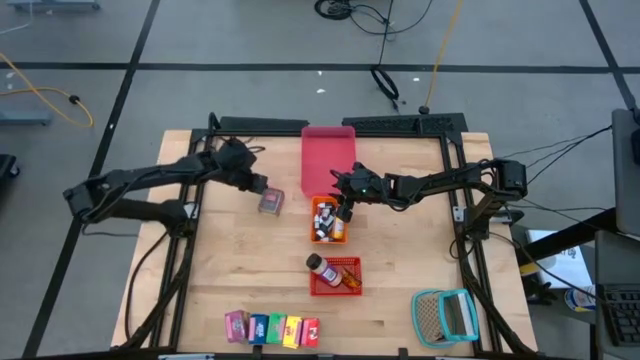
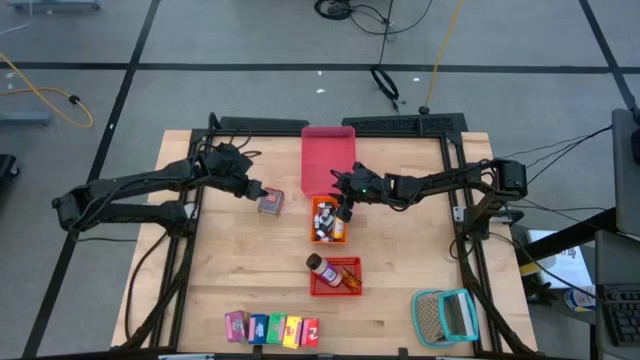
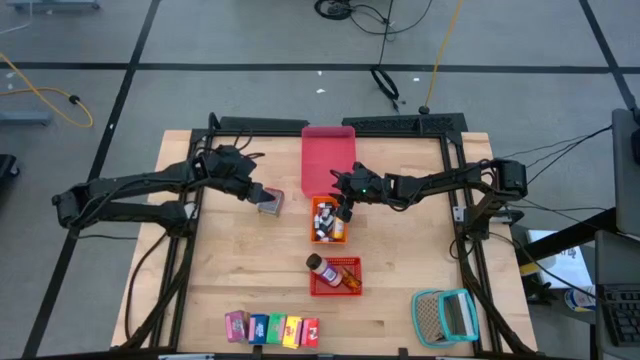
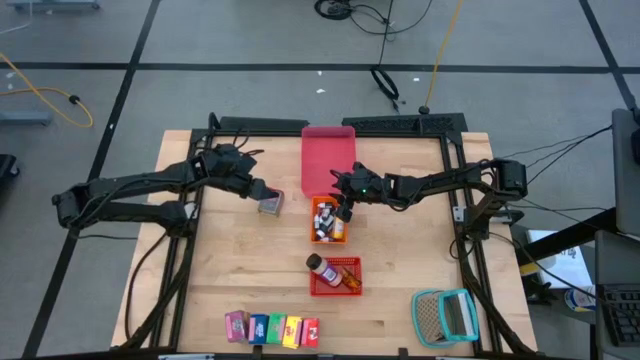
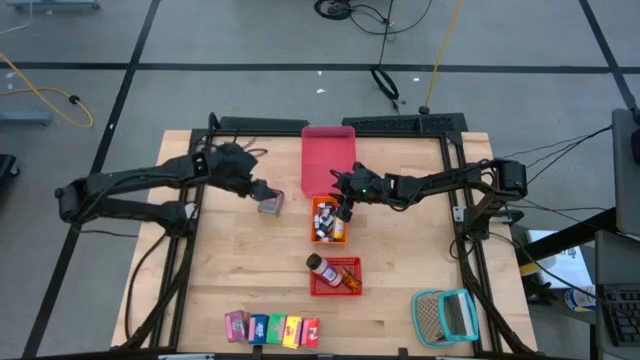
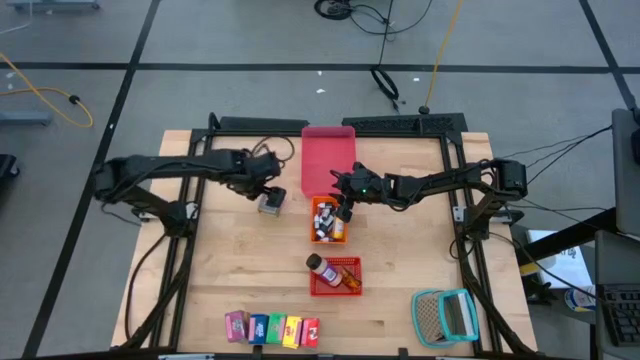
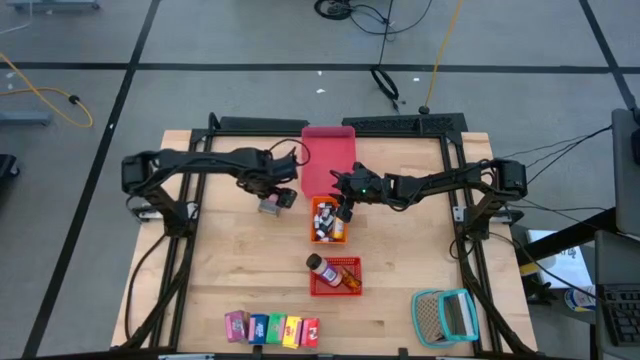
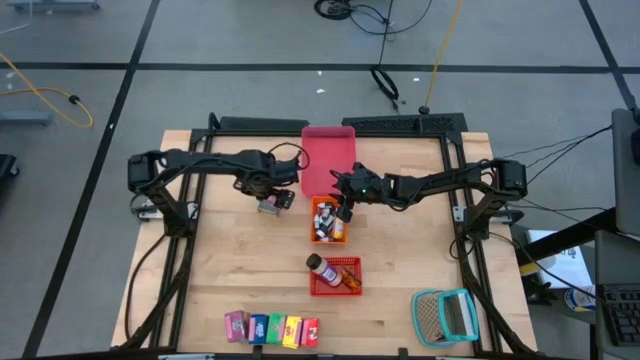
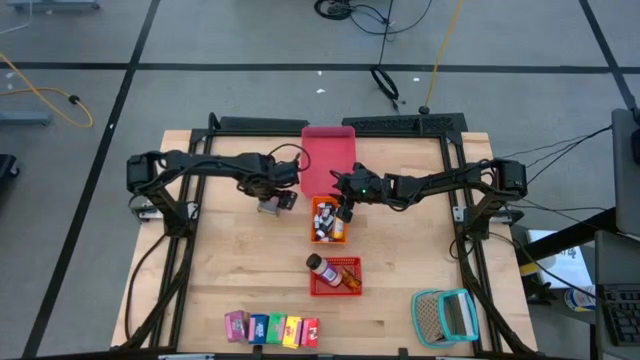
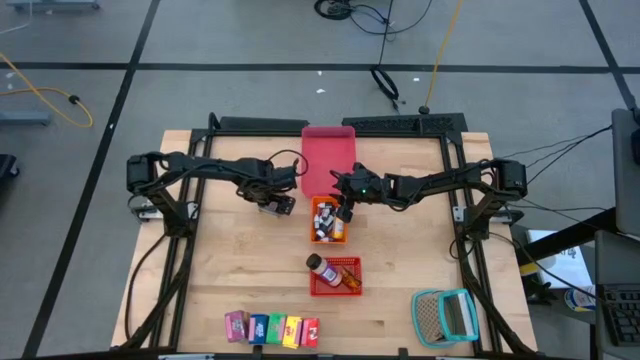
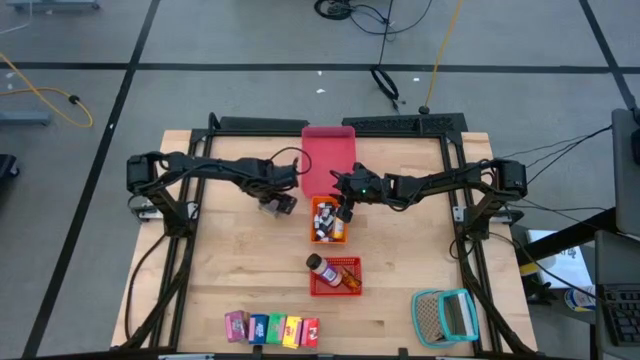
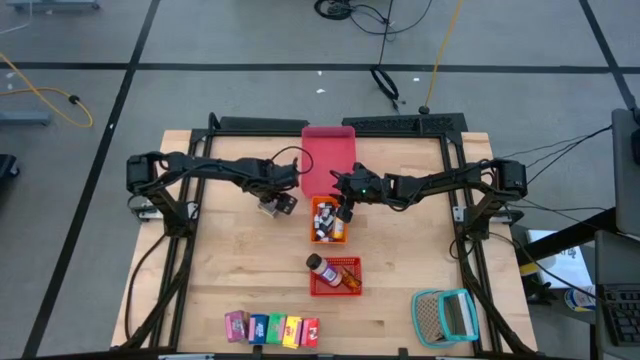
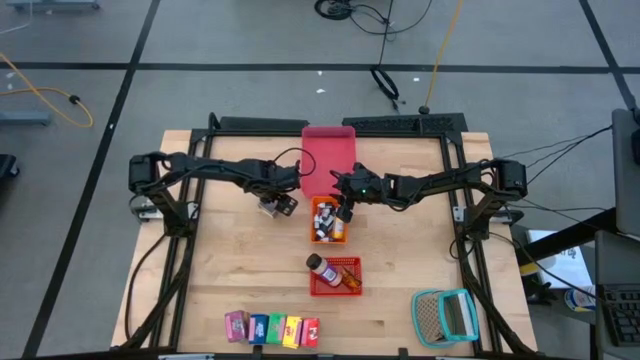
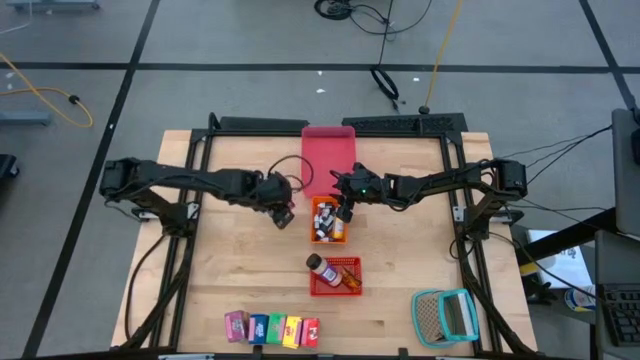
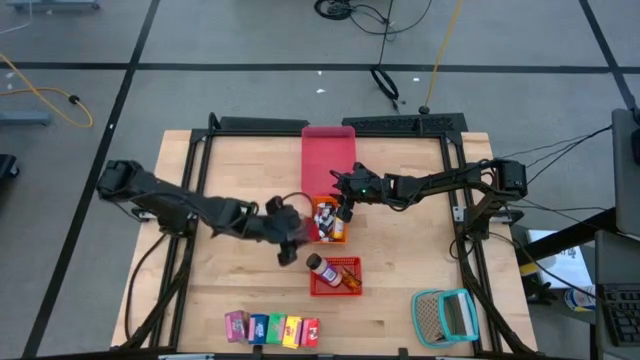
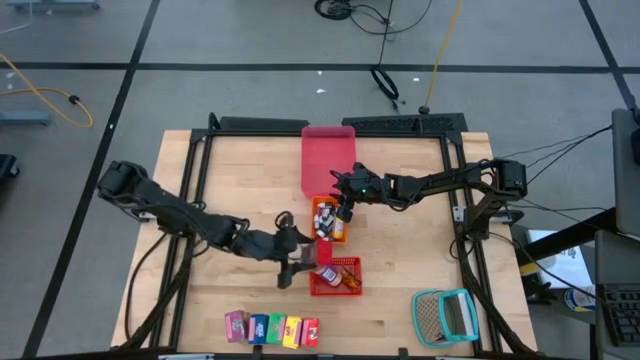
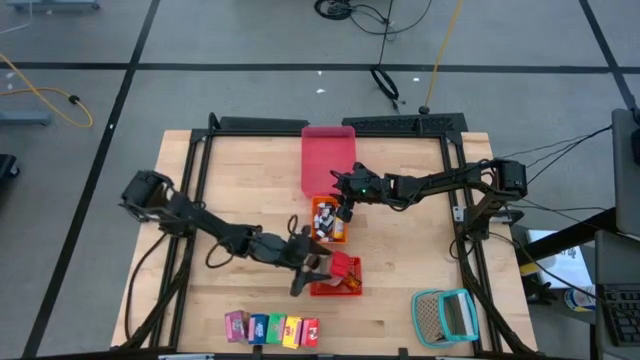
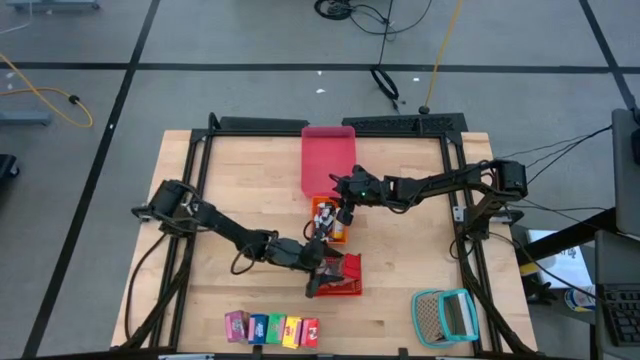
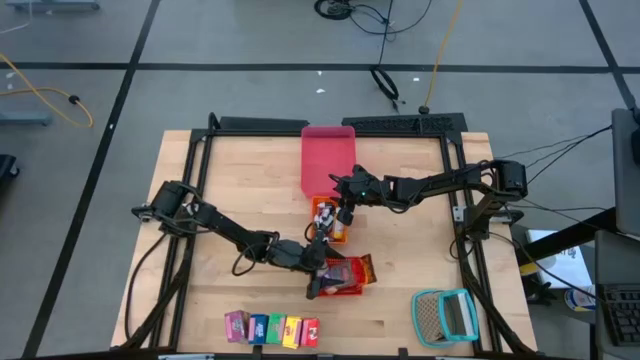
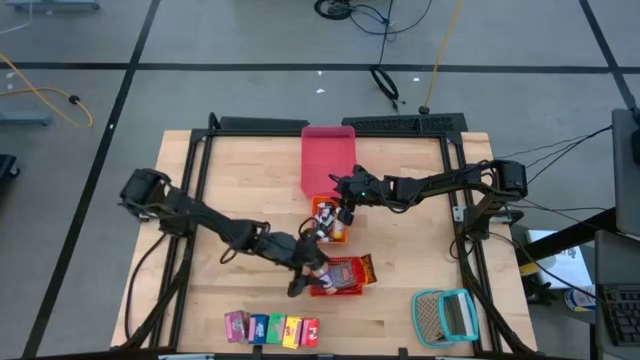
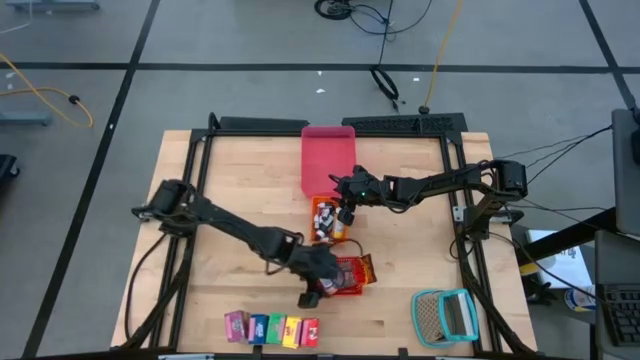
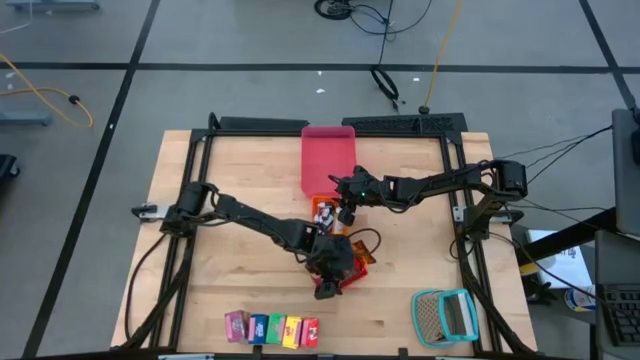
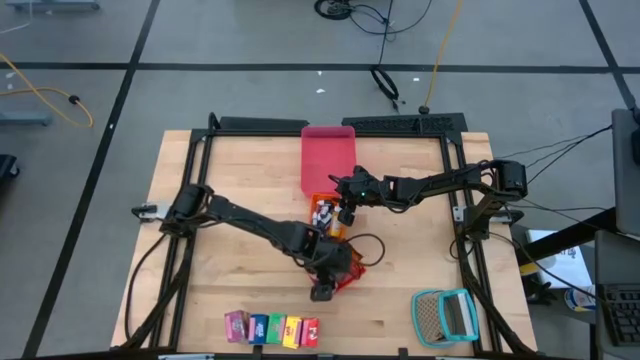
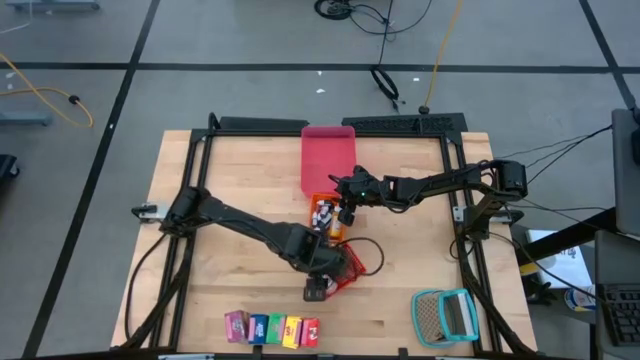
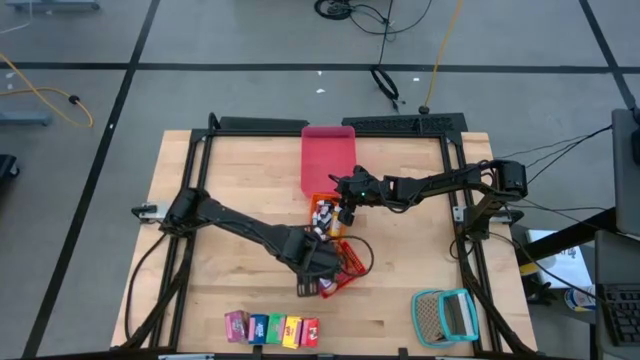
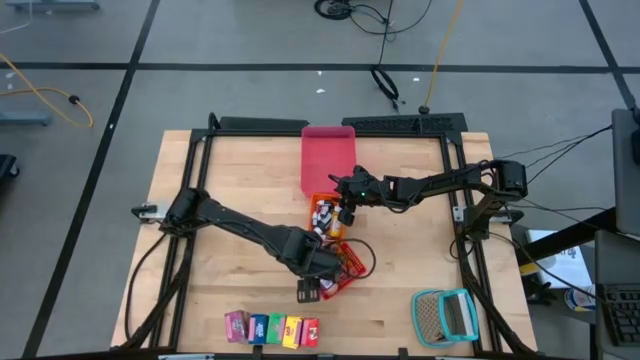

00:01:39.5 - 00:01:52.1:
Task: Pick & Place Kitchen Items
Put the red seasoning can into the red basket

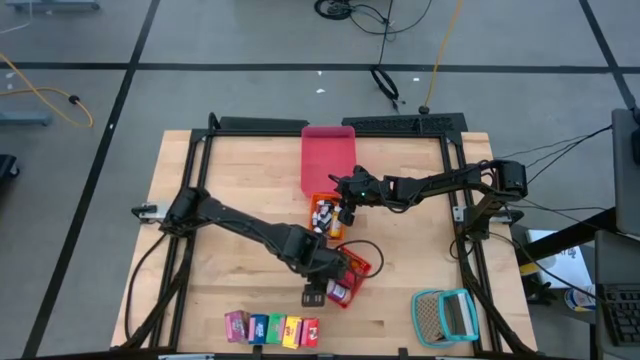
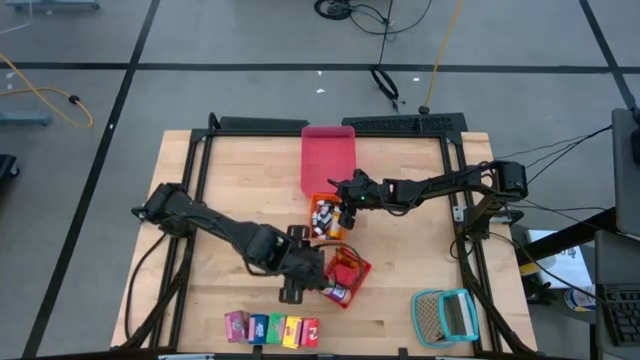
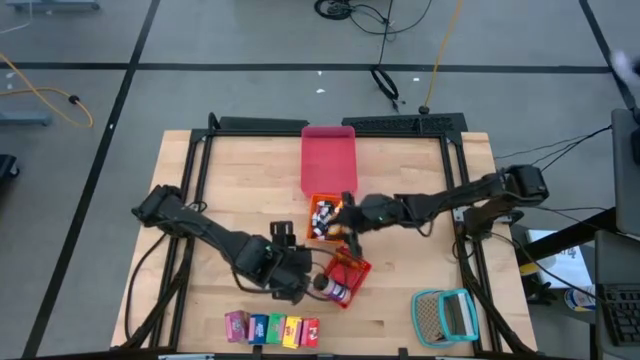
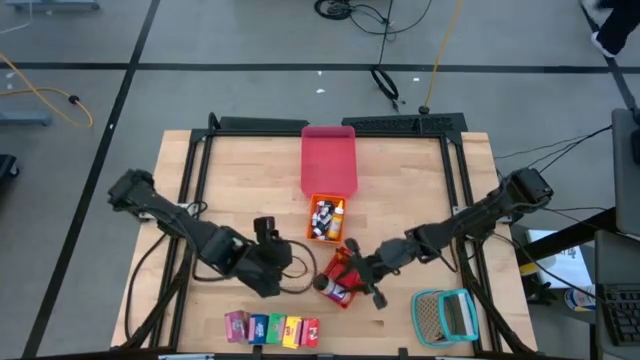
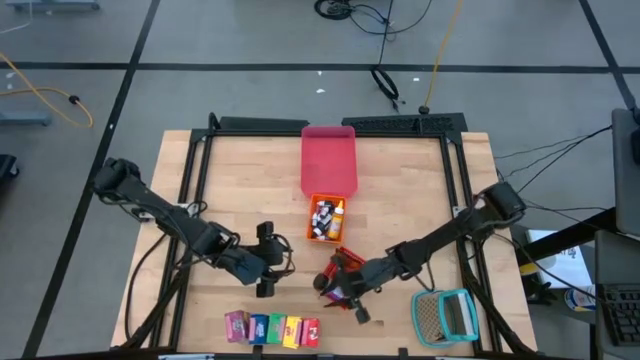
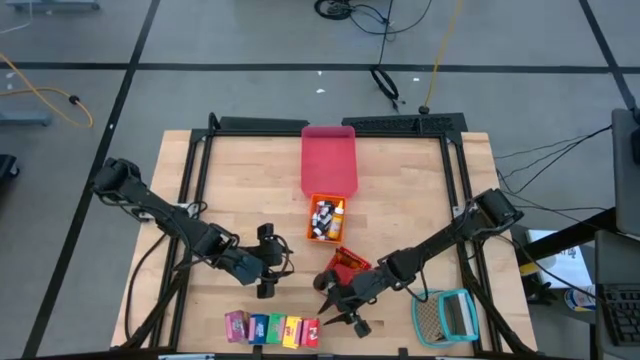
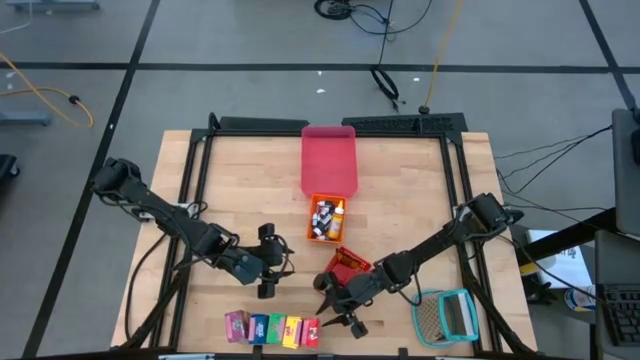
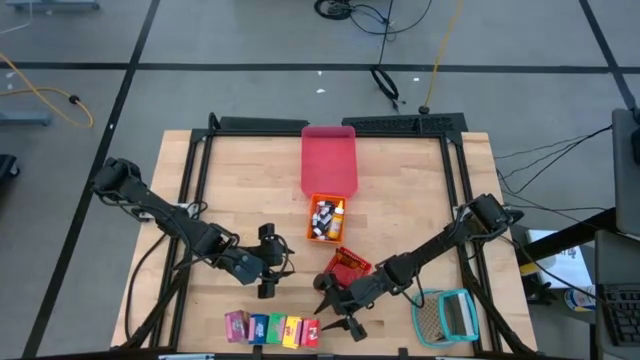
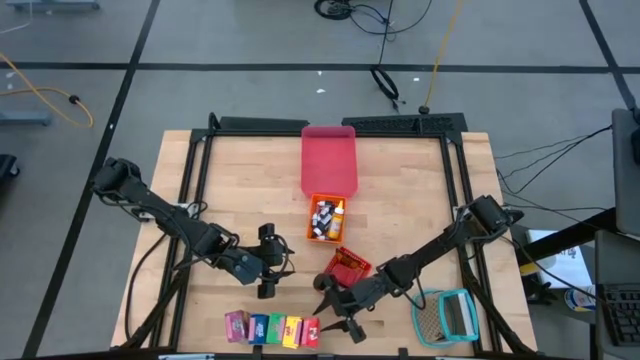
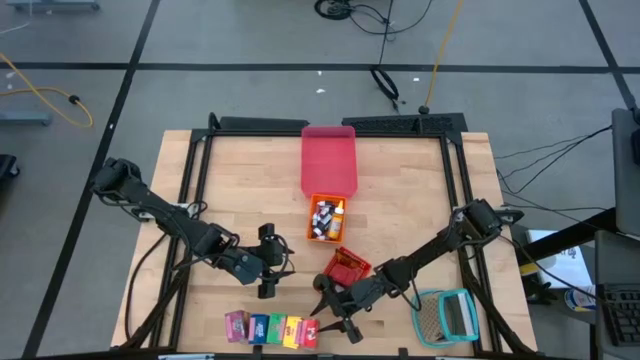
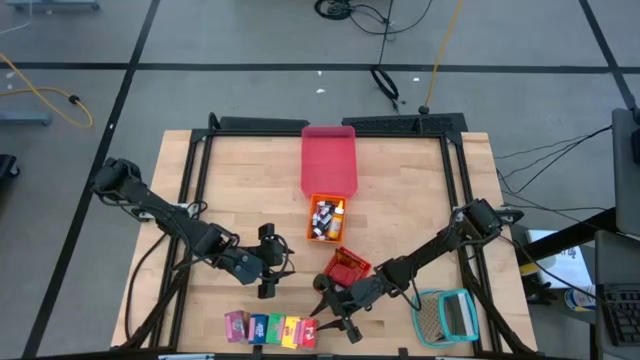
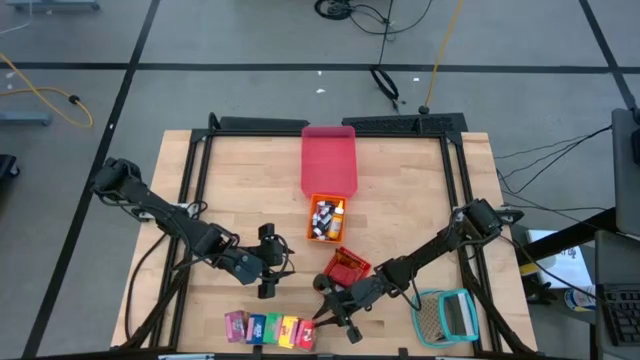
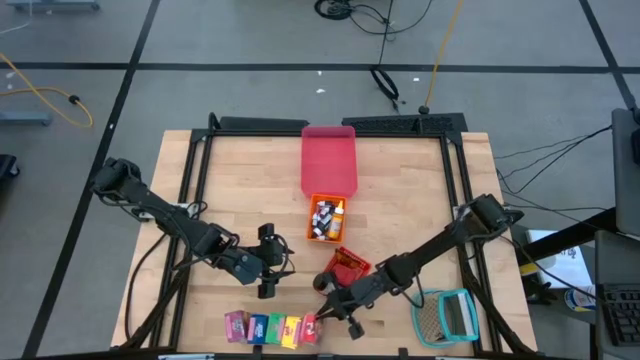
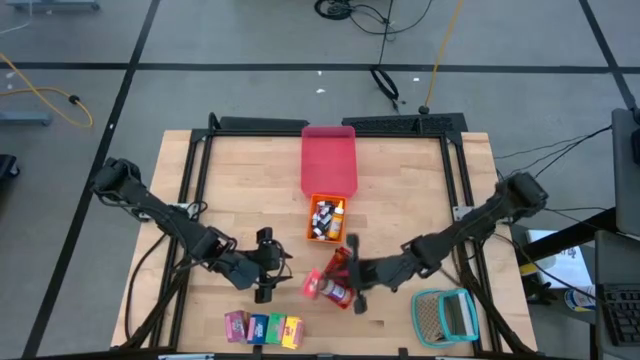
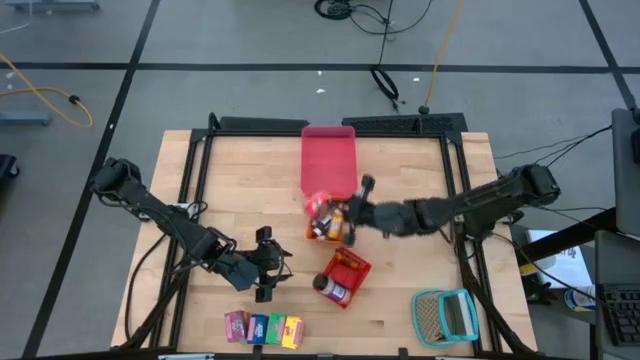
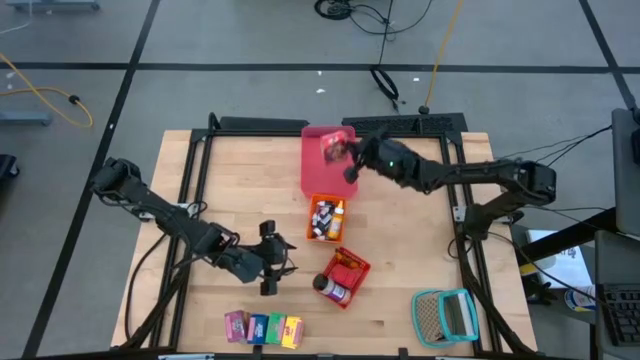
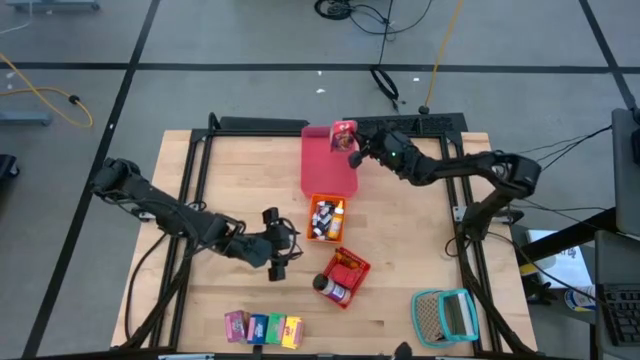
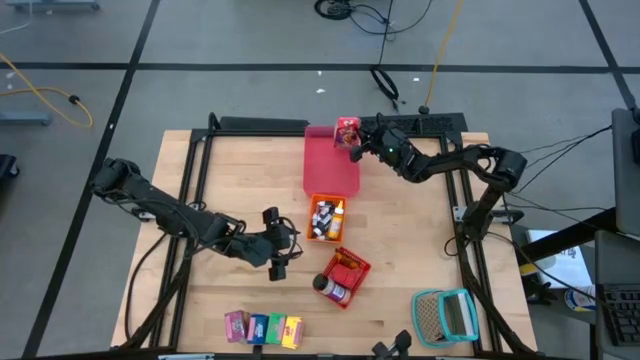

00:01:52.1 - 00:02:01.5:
Put the red cereal box into the red bin
